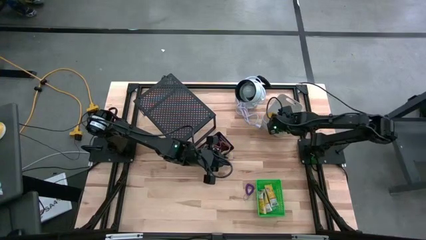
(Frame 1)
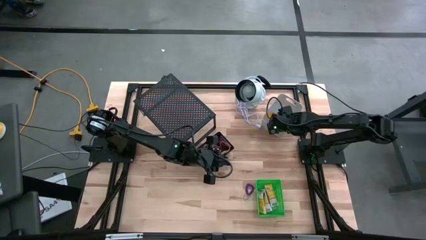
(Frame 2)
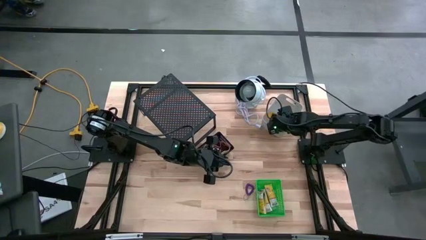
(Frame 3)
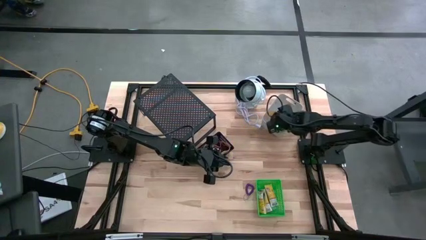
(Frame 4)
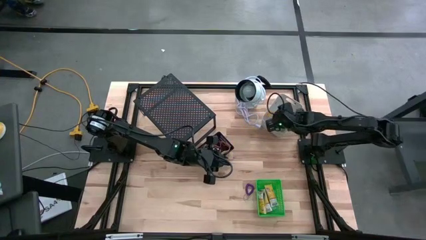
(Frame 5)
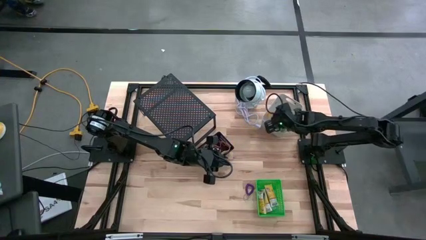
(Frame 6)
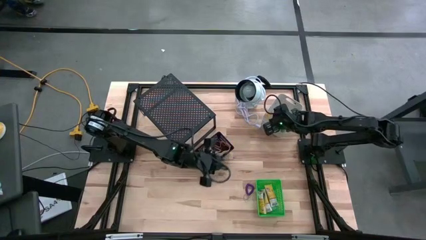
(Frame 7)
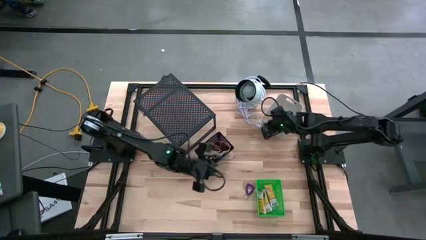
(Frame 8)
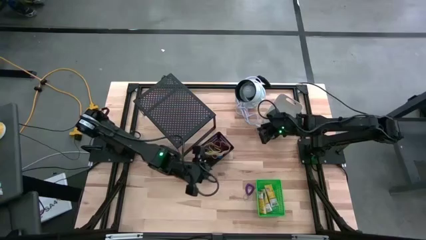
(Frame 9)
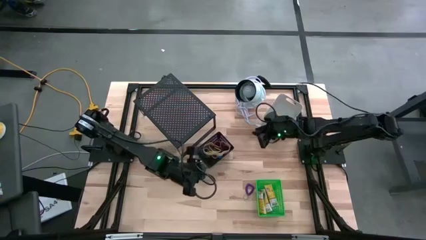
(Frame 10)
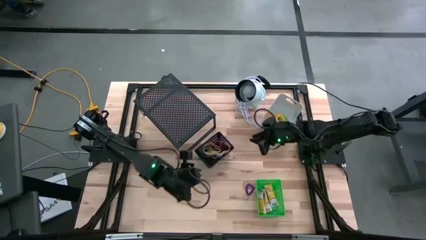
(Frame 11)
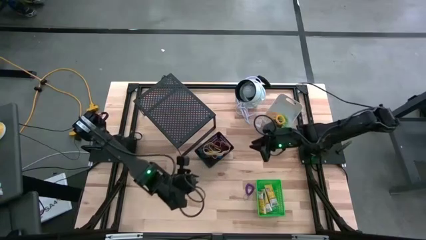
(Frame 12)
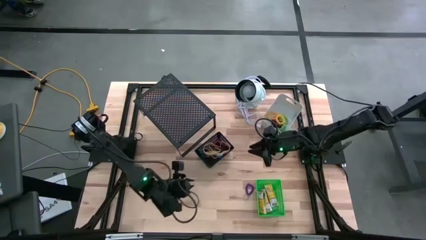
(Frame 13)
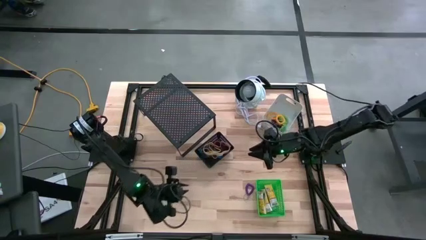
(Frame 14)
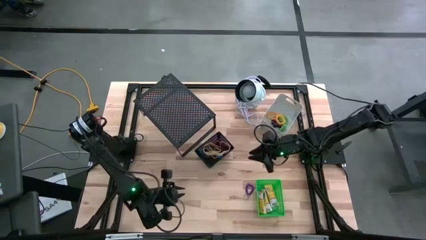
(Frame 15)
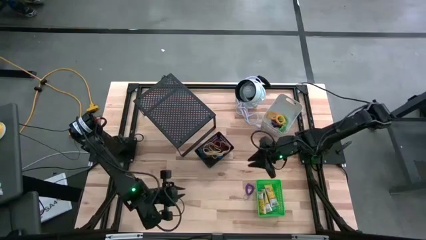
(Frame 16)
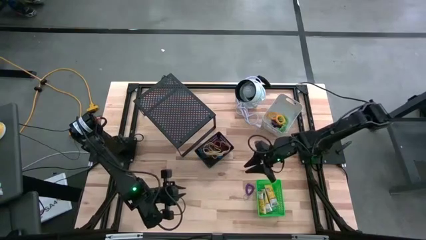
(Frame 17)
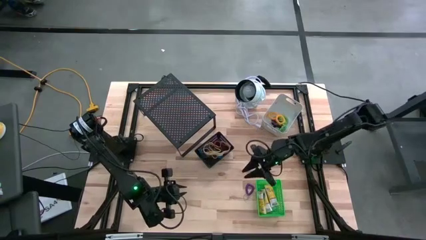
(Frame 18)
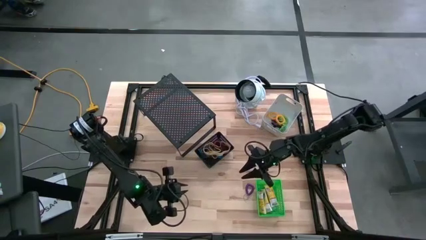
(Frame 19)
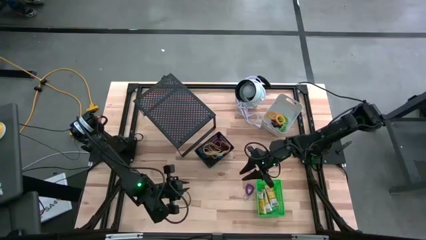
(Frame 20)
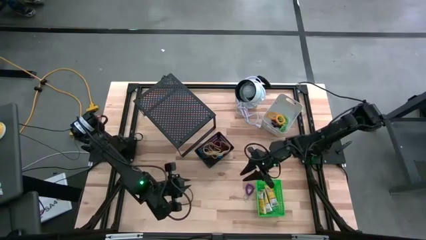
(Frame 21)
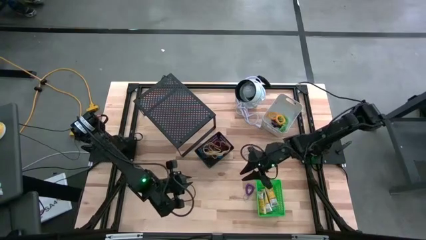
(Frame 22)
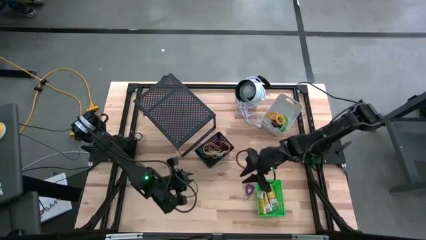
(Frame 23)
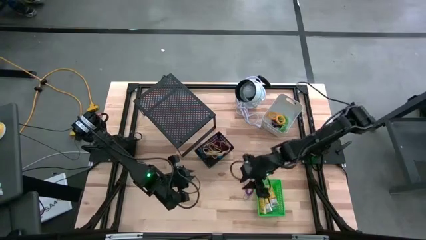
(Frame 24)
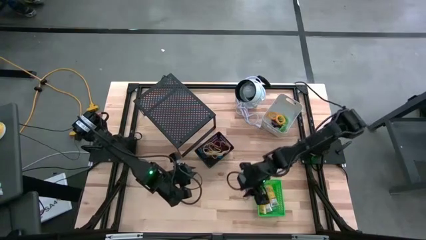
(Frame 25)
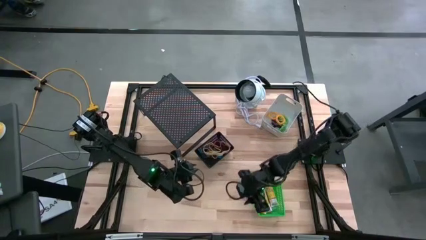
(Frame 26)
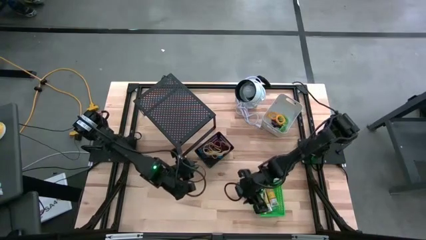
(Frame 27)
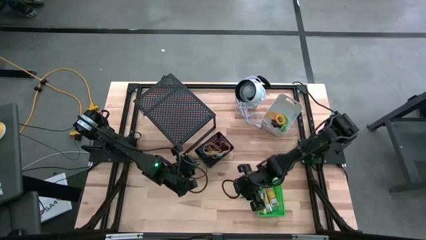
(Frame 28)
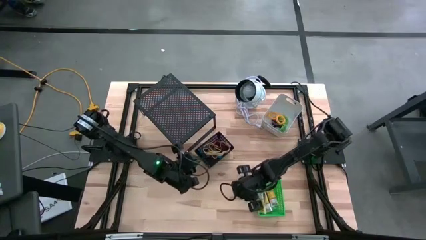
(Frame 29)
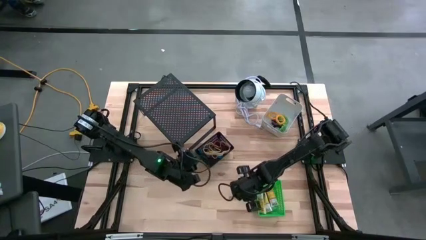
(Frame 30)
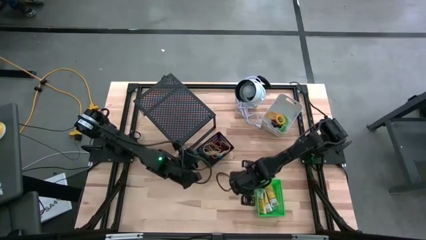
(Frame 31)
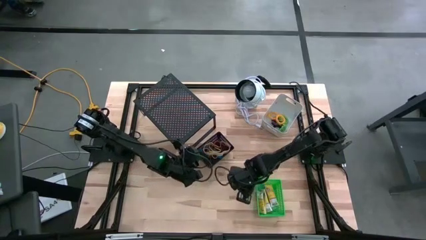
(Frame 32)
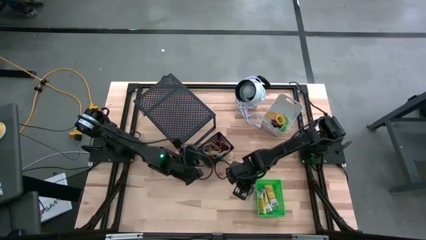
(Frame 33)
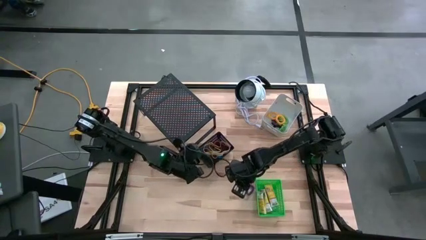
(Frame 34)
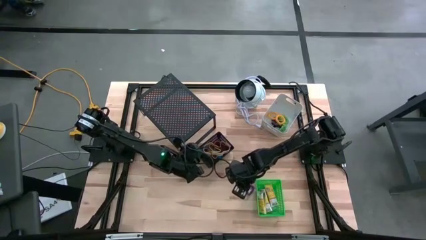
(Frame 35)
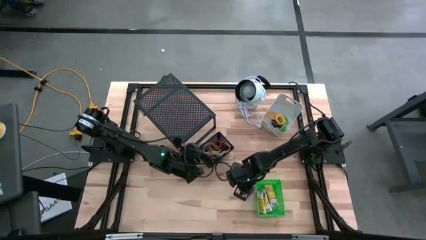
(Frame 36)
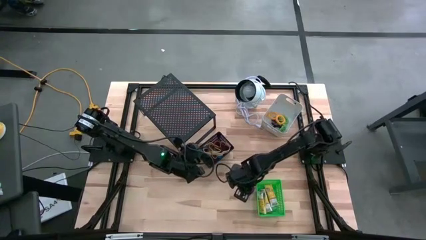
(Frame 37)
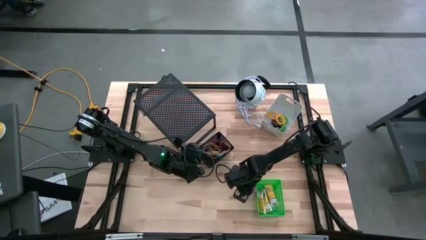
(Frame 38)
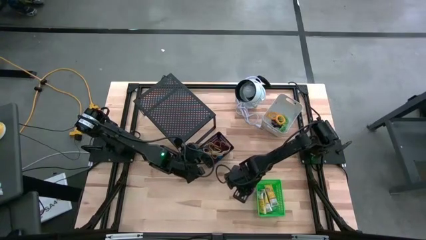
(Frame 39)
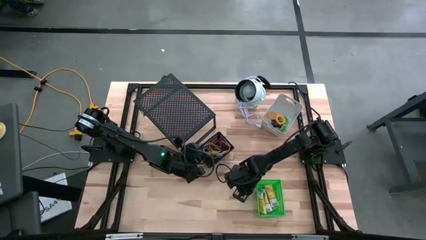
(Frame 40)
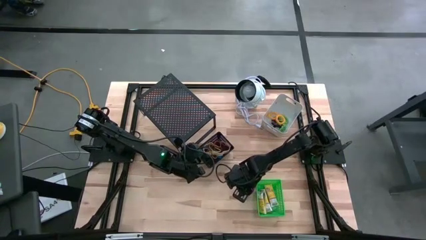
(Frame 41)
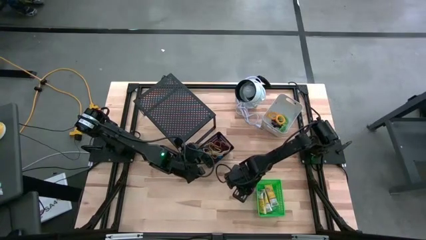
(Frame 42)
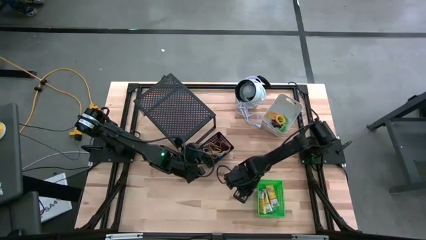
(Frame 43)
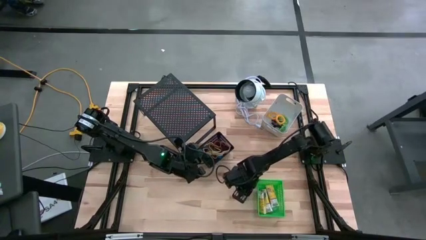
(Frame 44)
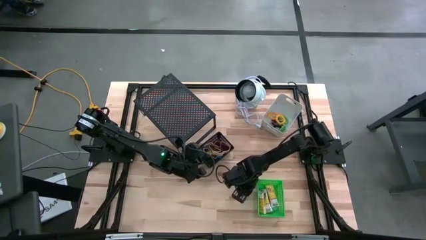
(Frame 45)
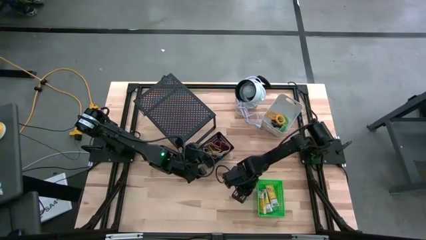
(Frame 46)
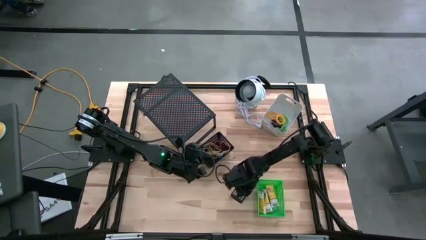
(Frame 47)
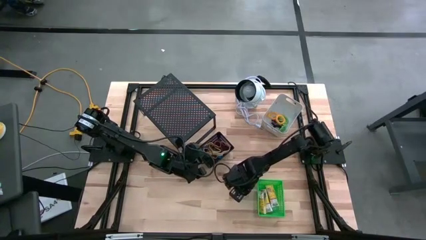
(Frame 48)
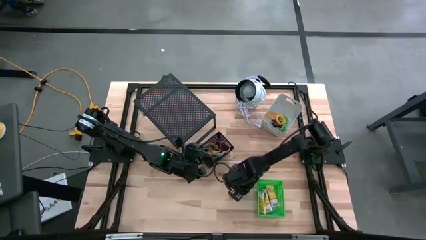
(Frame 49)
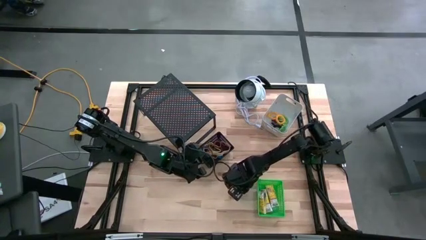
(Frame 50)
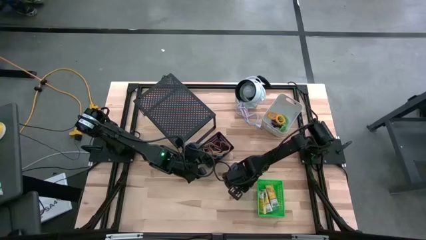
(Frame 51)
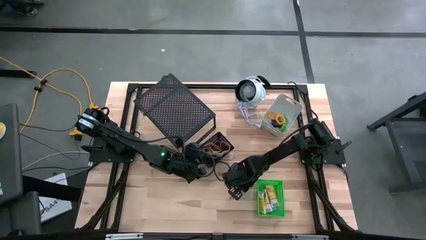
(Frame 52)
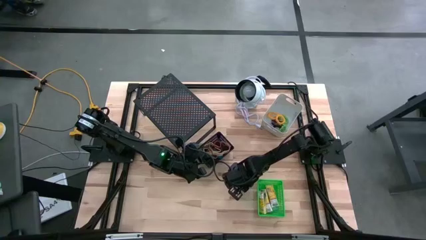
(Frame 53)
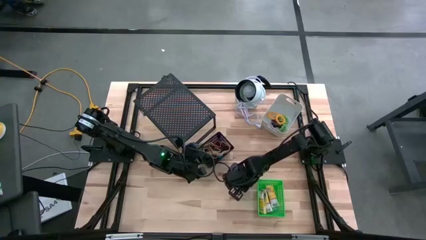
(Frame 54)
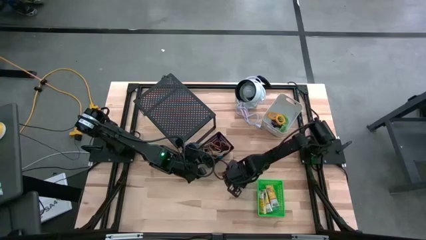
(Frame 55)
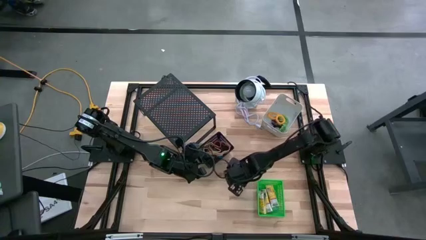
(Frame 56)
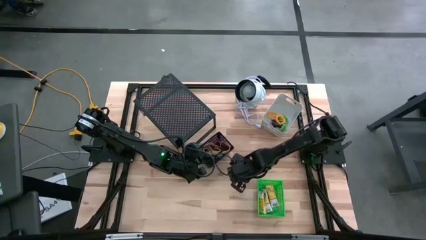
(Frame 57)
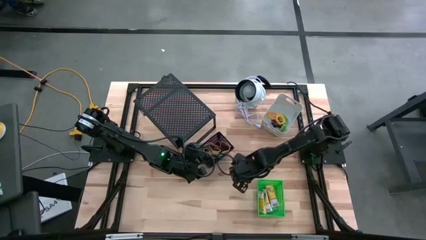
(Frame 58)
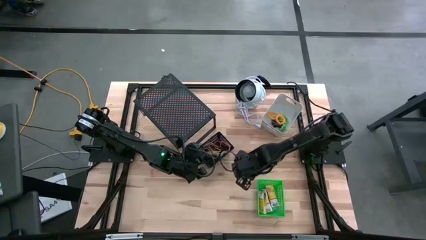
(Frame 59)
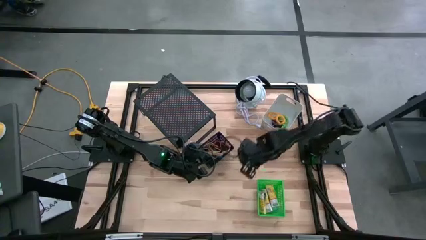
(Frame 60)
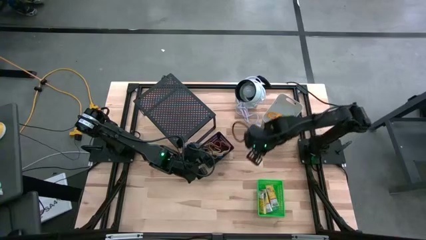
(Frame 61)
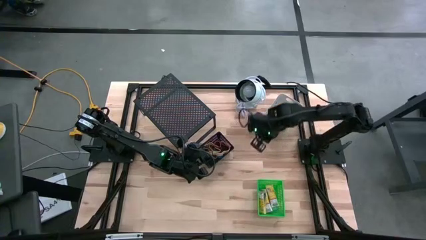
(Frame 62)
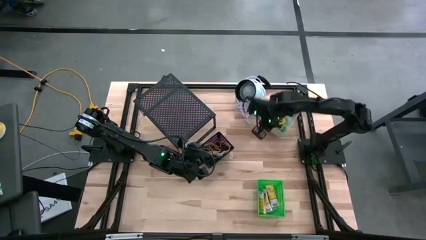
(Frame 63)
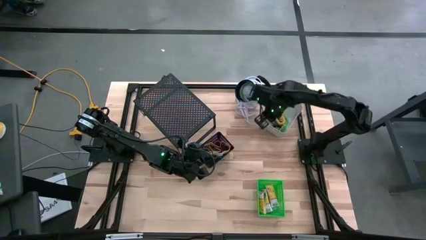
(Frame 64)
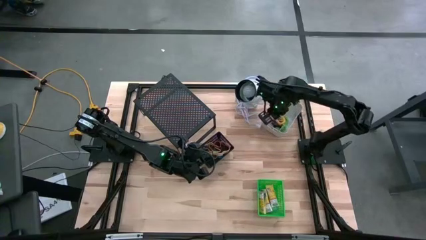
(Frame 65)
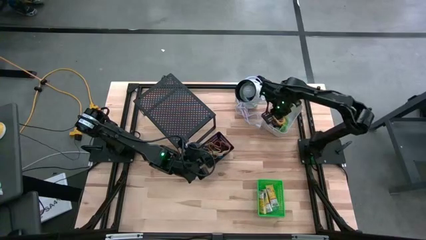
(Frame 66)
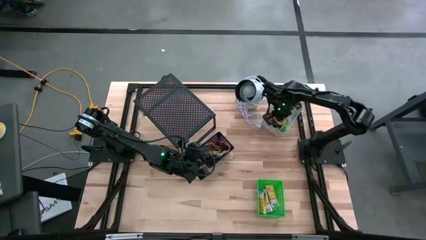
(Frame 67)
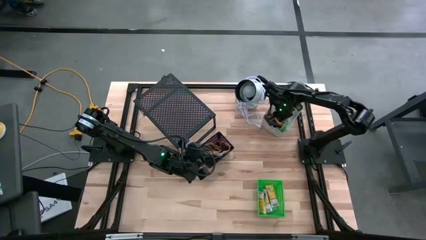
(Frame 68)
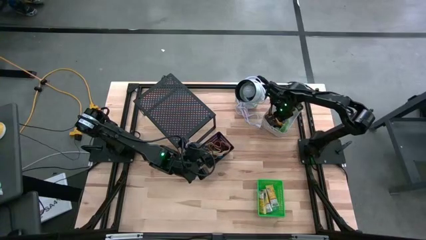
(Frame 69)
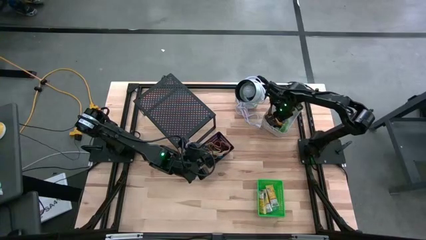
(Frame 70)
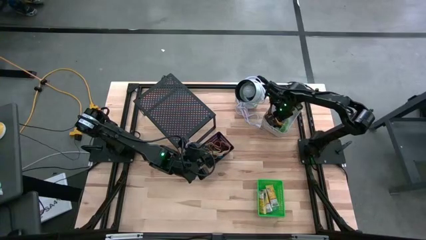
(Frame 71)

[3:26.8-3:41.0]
Task: Pick & Place Office Desk Supplies
Put the purple spring keychain into the white bin

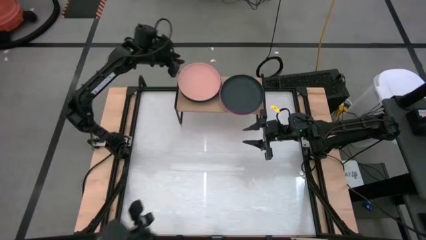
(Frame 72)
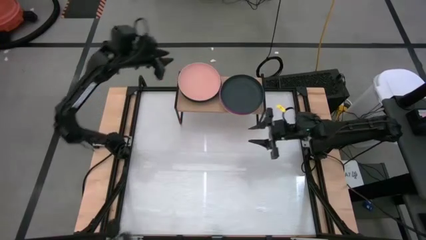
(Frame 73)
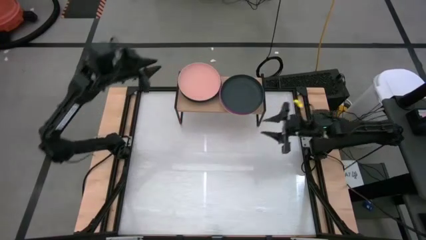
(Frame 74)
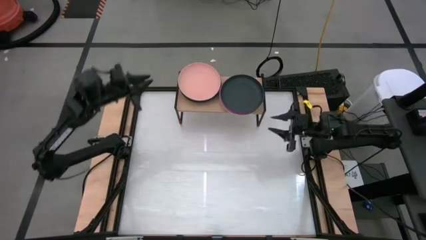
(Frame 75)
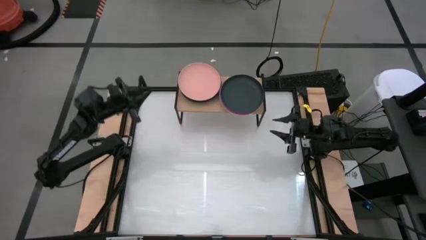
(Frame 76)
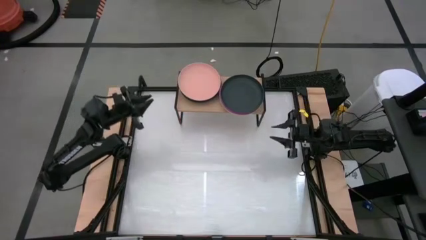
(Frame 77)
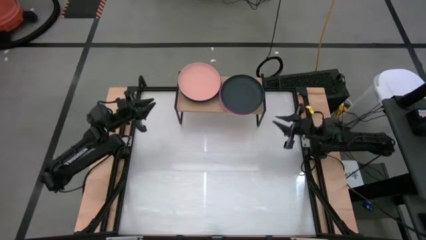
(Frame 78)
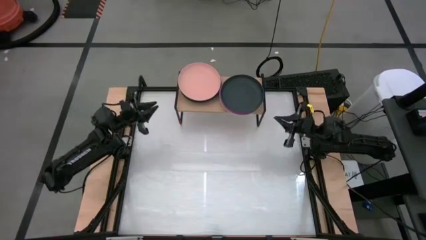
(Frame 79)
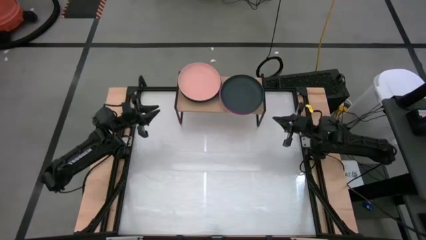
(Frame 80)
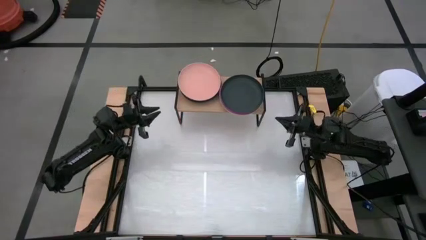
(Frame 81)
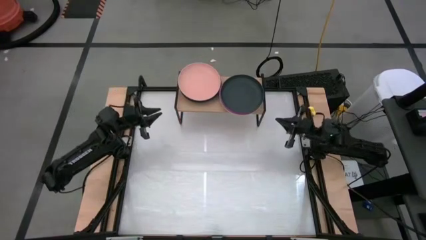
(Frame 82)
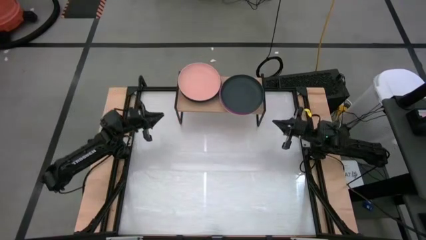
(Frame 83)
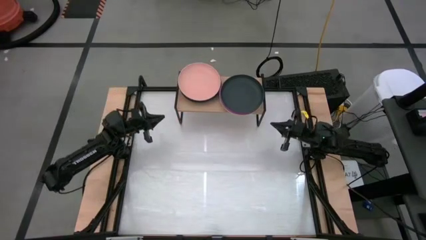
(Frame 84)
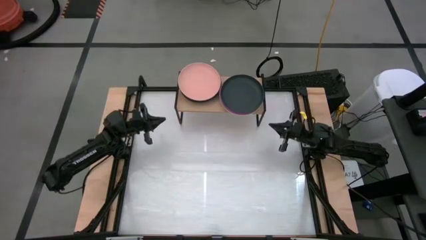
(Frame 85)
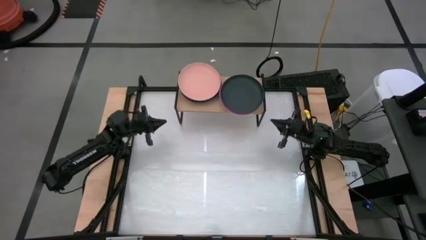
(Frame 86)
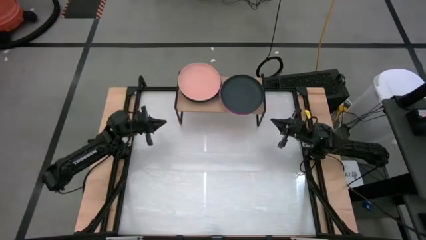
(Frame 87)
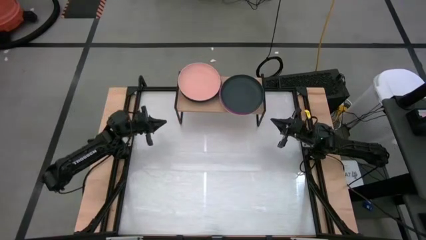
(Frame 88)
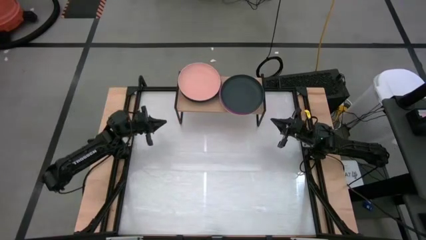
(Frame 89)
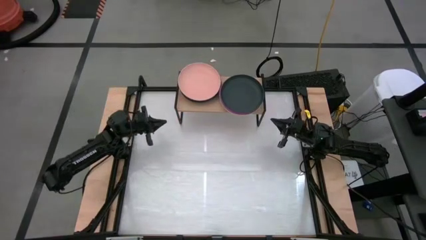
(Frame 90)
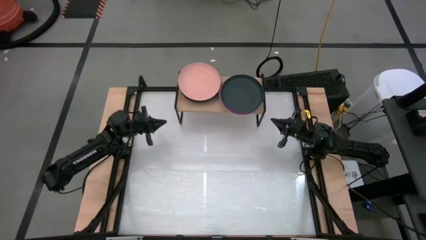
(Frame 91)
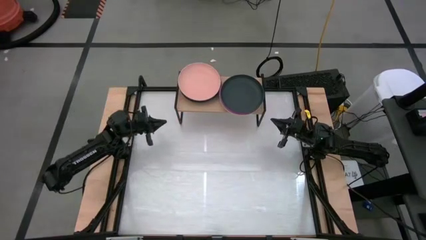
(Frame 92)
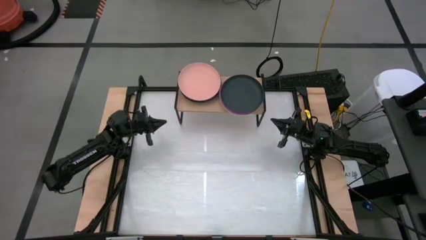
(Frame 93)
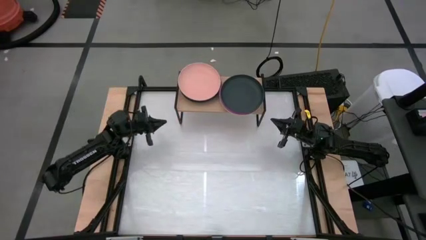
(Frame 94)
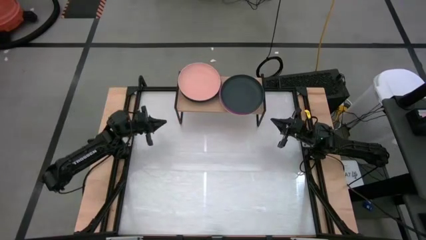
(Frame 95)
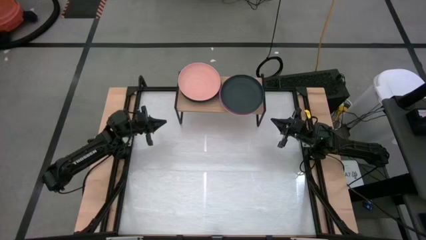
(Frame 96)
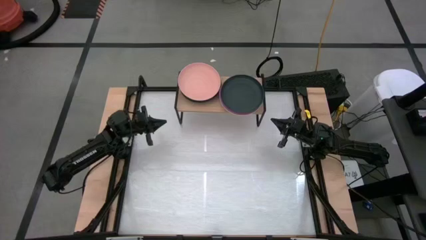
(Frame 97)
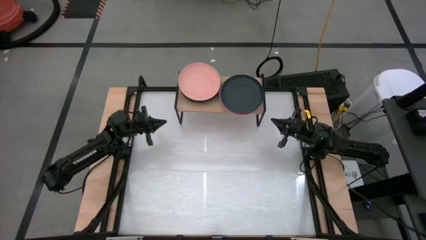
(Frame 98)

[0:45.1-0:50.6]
Task: Place and stack plates onto a shelf
Return to Home Position
